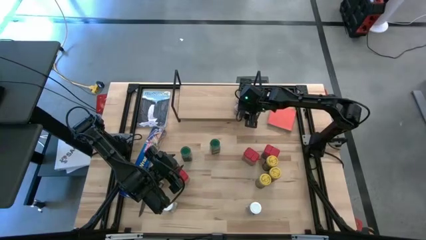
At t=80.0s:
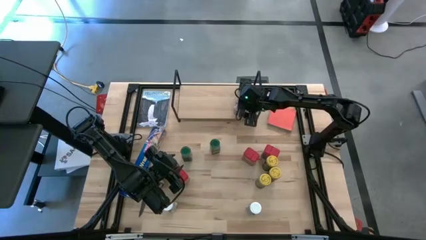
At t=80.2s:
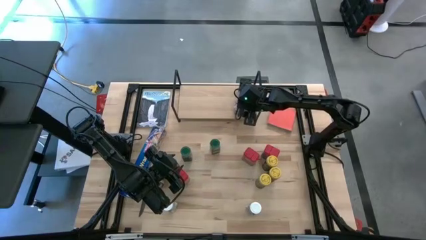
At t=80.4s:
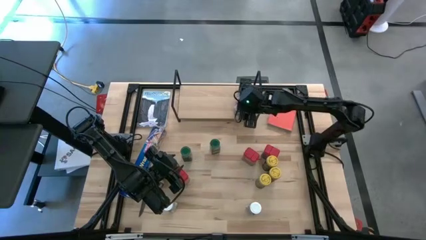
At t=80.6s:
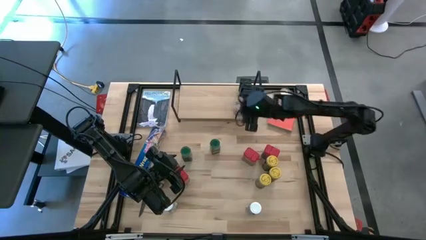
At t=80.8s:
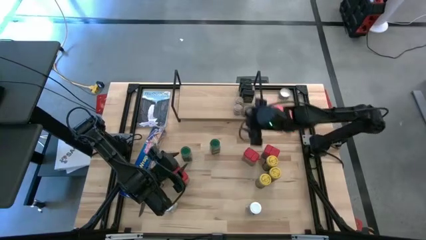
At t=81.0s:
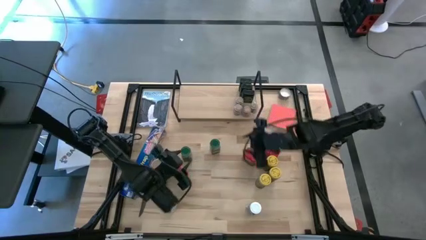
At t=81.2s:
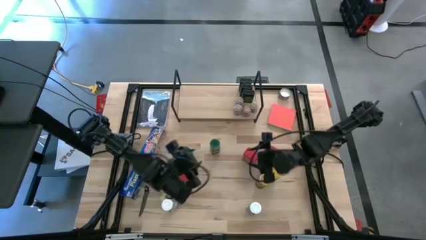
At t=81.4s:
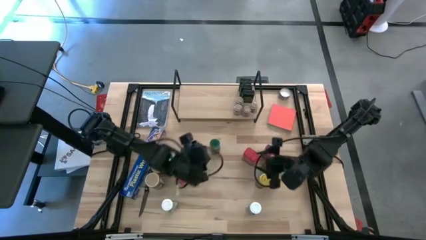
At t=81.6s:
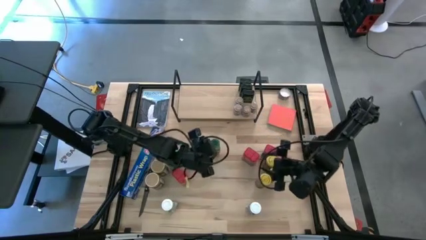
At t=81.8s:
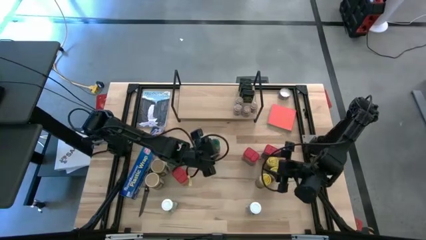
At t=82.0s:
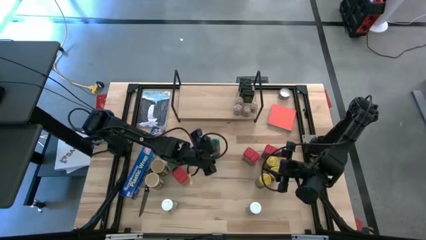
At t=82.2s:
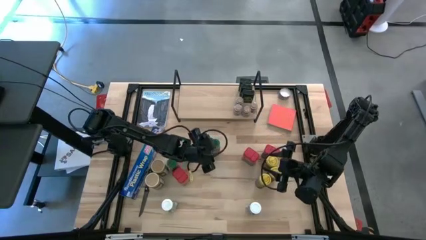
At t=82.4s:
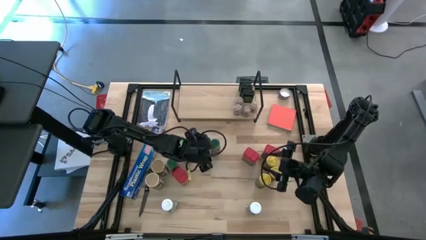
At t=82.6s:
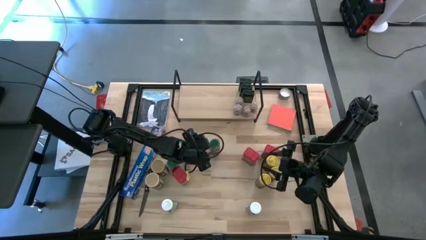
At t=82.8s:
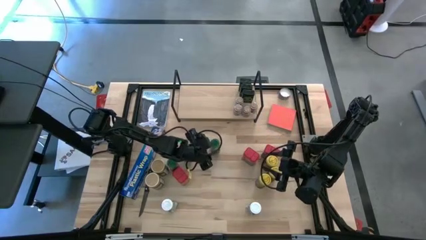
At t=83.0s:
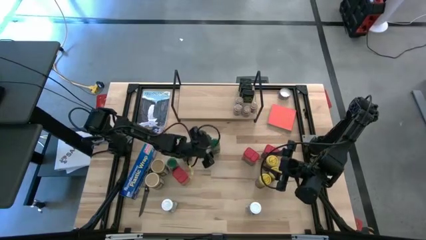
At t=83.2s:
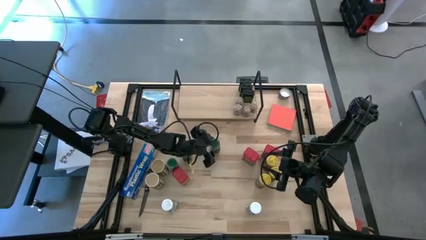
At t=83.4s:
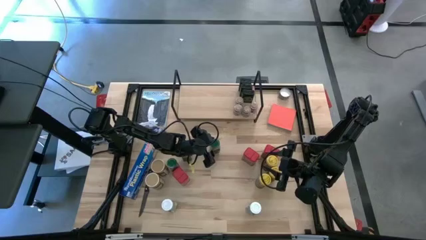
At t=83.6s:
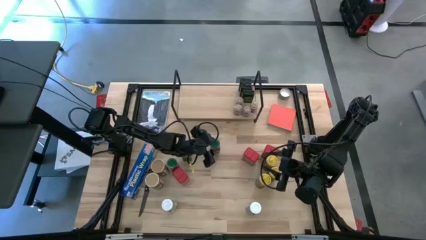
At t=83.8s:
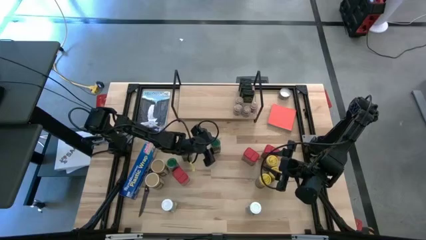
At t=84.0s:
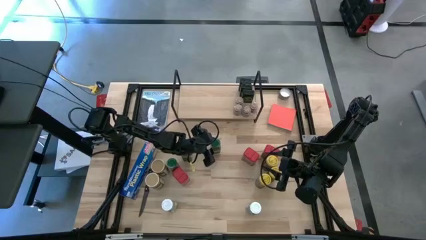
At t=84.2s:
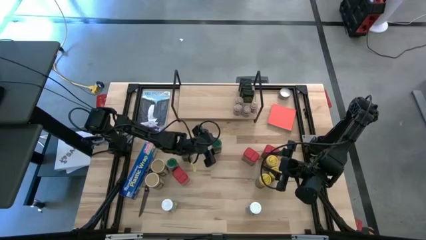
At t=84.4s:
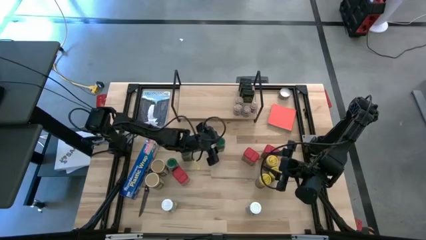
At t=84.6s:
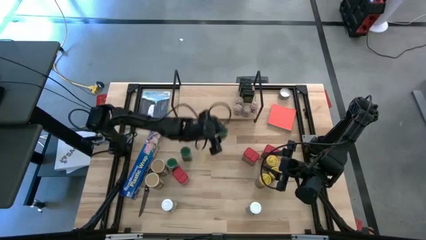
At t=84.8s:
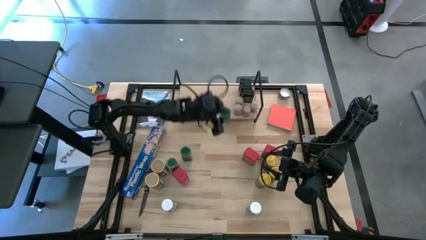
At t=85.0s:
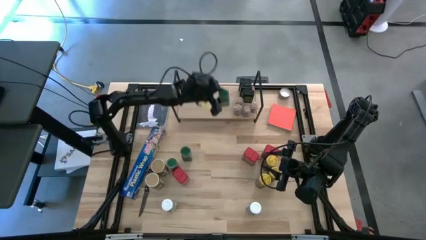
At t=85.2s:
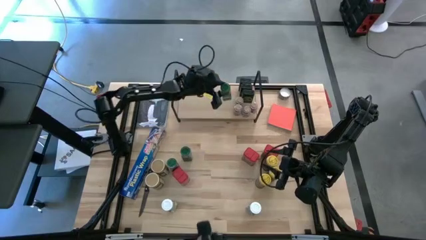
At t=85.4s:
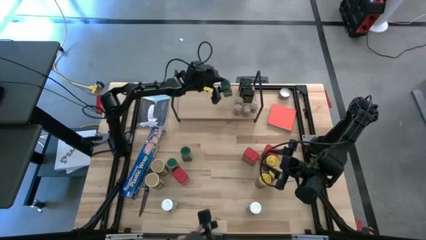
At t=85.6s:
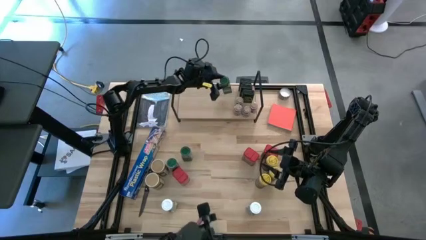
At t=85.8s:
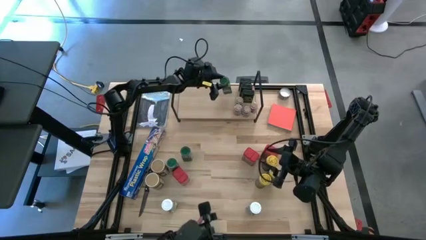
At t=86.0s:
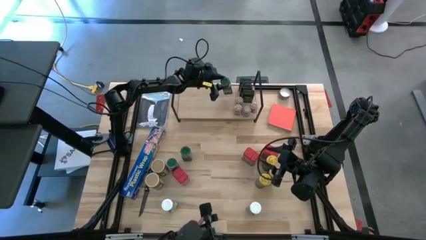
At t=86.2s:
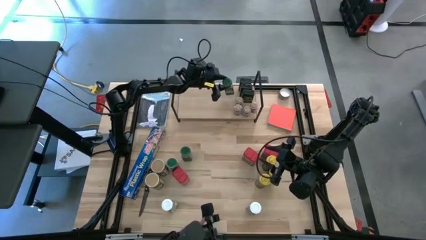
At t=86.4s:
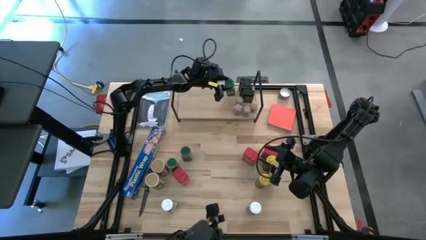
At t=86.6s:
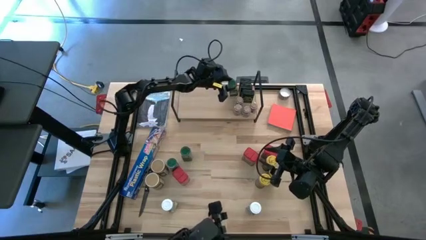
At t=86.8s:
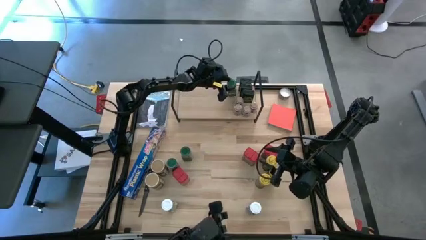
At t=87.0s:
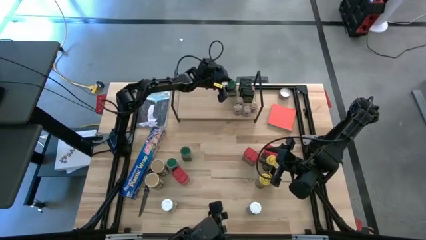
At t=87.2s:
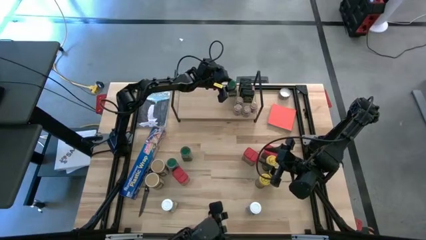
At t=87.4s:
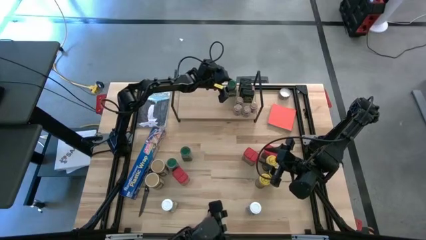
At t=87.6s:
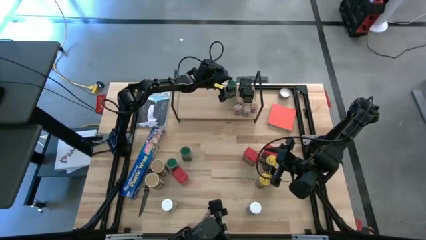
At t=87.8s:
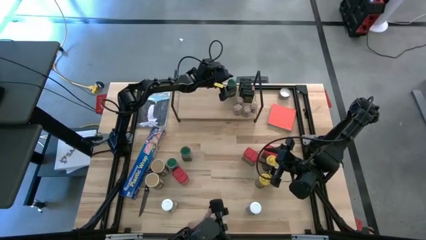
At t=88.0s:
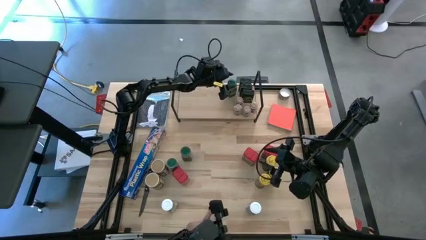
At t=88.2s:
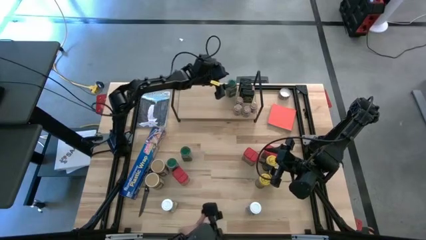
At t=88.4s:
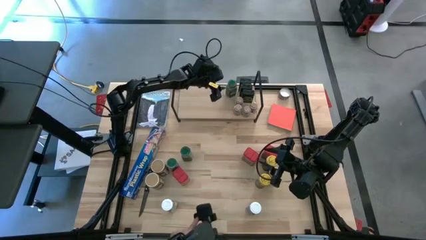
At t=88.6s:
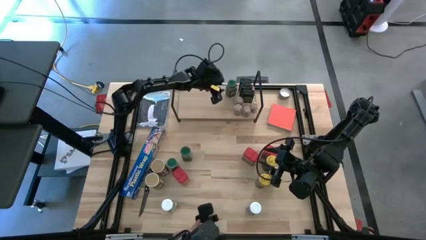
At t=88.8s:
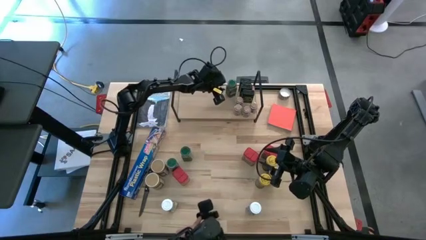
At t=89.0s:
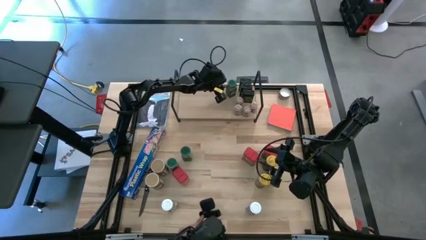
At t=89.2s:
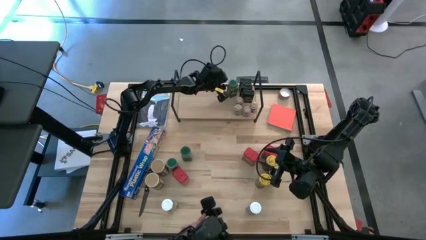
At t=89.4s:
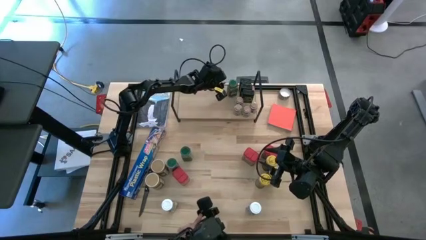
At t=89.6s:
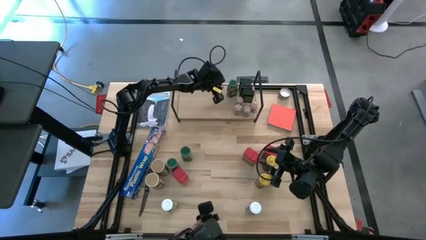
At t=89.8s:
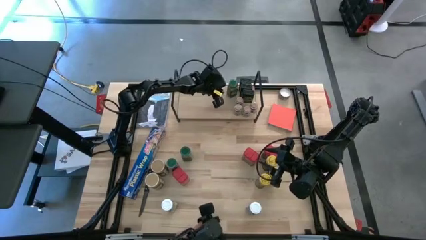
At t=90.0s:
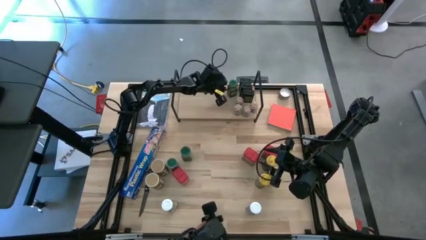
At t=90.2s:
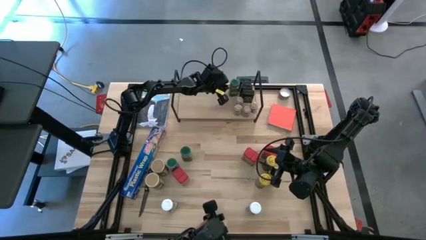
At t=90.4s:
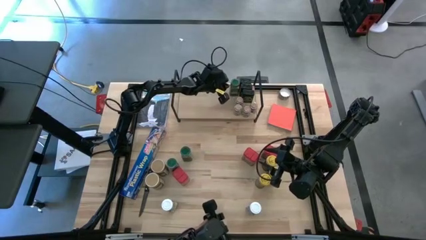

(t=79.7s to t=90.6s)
Task: Shelf spices
Put the green seasoning bottle on the shelf

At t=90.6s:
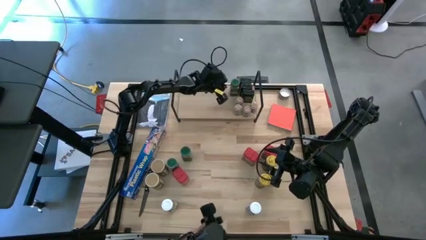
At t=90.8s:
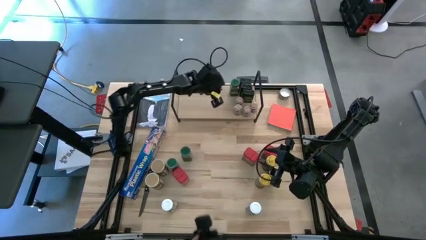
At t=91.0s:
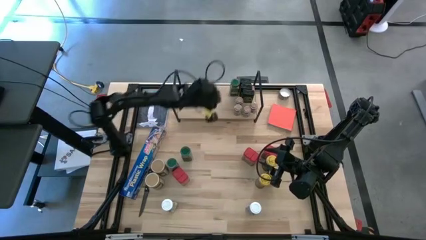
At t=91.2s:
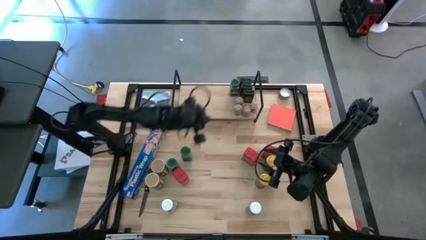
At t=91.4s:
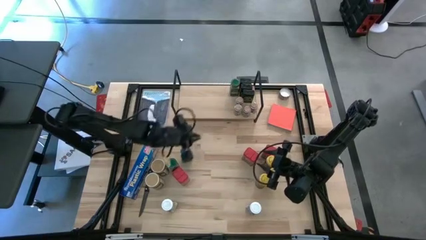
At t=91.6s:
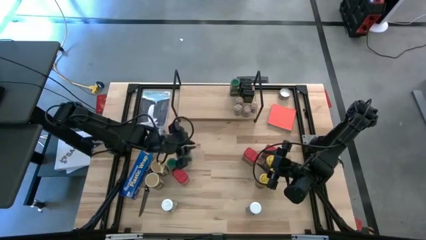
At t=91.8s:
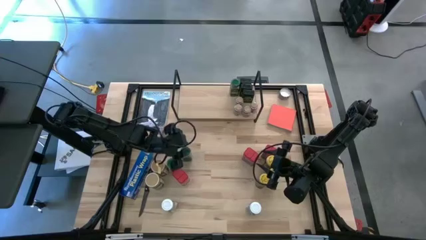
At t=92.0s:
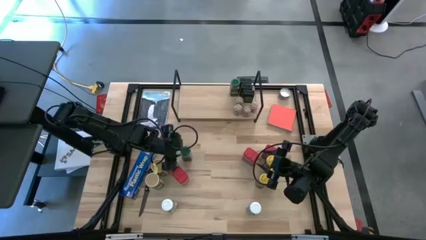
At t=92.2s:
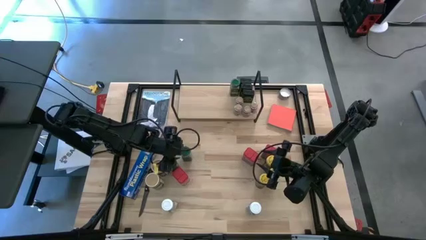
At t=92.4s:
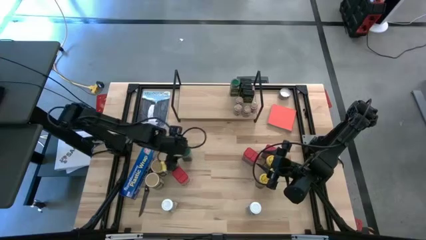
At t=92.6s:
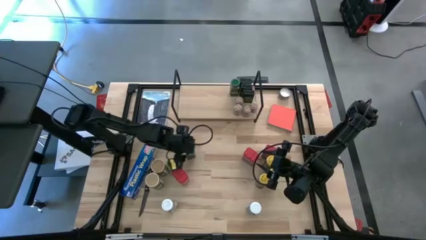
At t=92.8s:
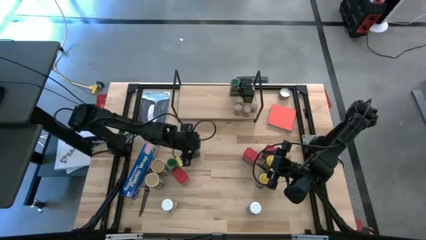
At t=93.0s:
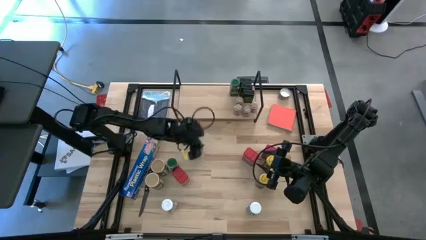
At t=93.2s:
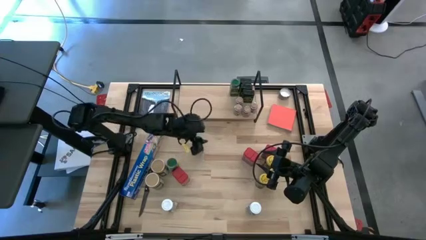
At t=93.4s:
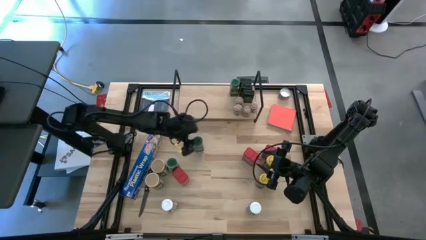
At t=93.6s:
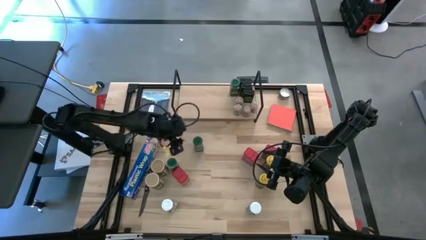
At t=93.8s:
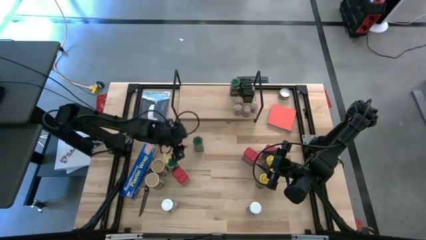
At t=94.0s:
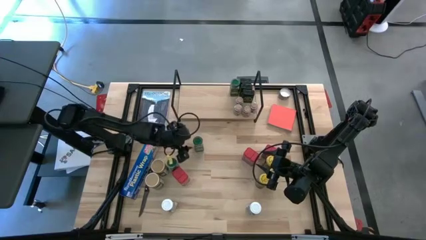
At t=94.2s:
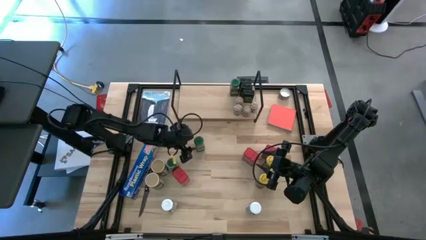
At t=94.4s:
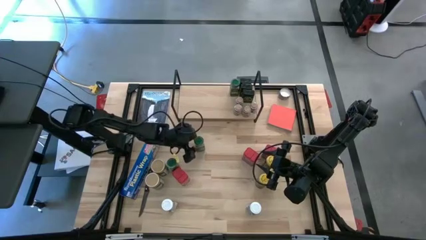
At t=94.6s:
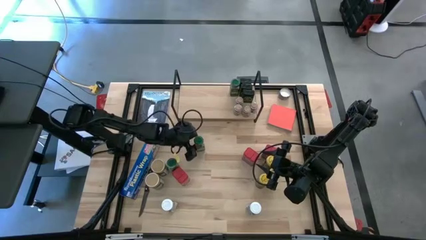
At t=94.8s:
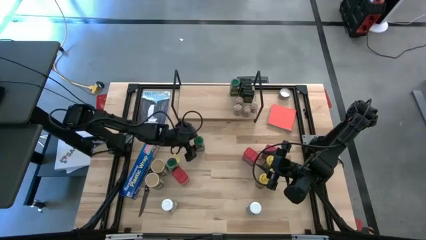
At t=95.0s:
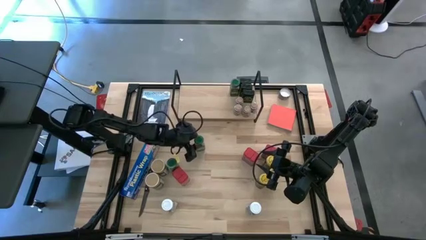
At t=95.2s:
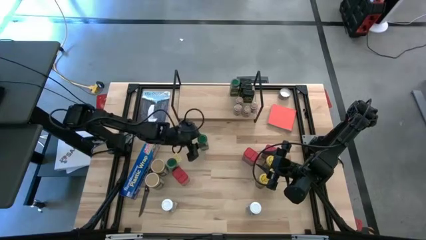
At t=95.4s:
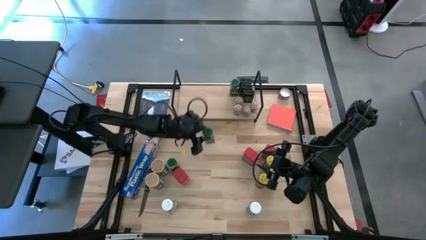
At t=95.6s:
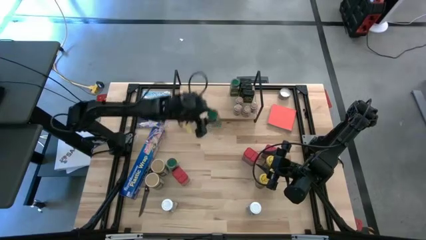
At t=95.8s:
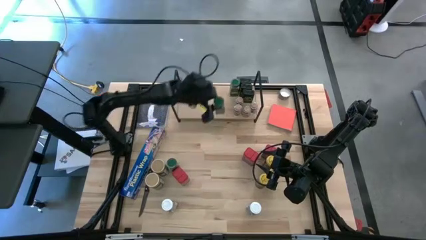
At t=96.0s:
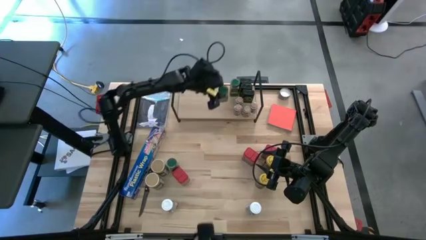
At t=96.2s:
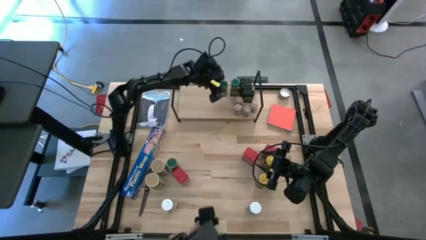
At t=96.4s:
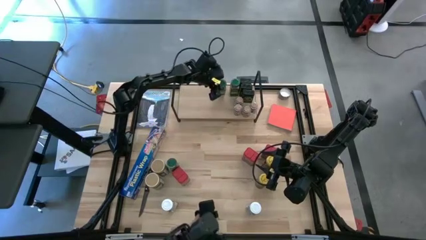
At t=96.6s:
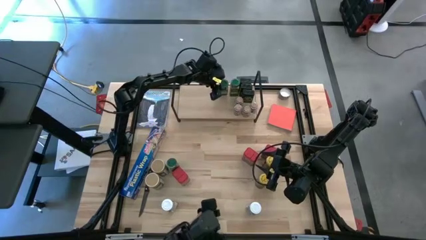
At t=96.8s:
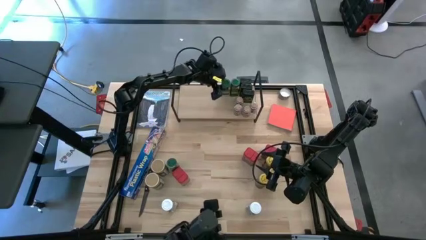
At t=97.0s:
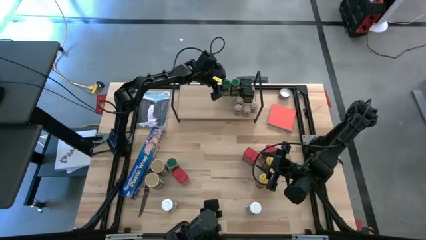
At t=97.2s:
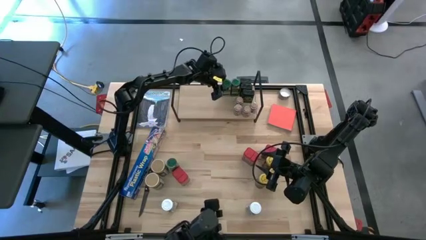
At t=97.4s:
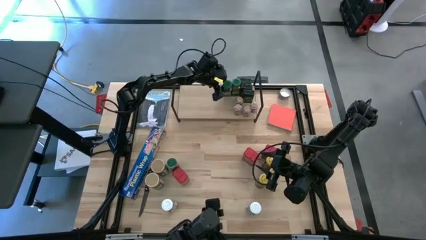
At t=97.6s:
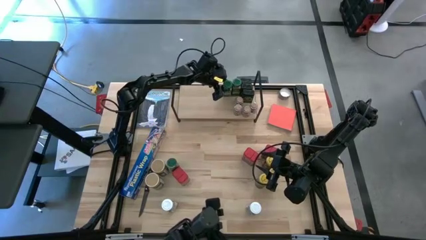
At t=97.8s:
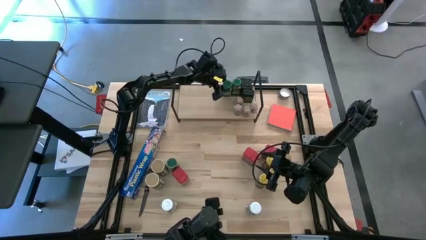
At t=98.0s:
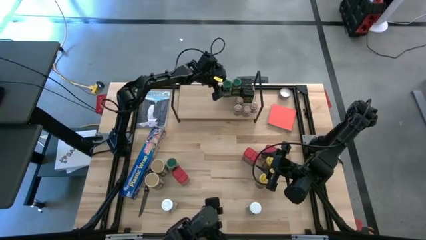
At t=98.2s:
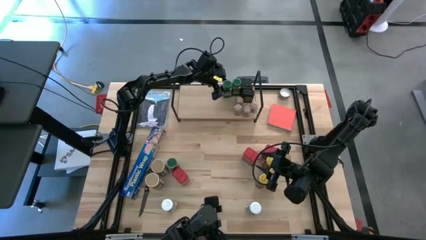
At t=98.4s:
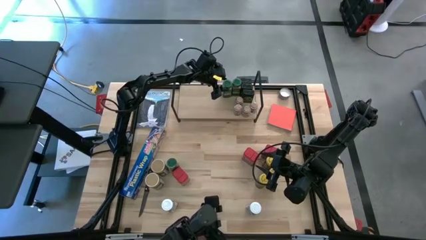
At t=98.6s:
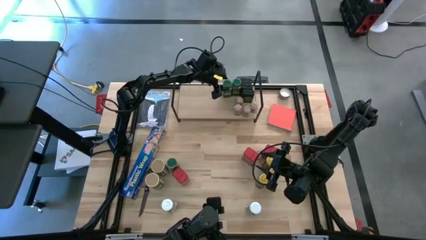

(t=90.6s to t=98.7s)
Put the top green seasoning bottle on the shelf aligned to the left of the green seasoning can
